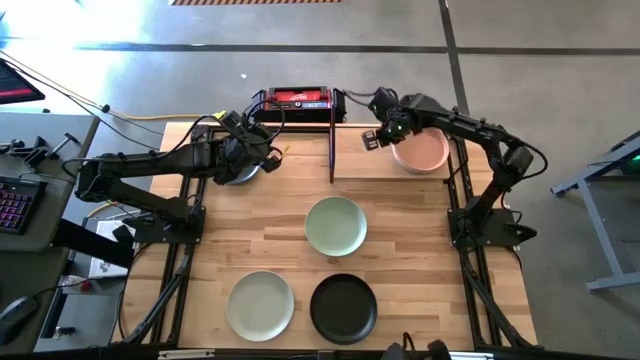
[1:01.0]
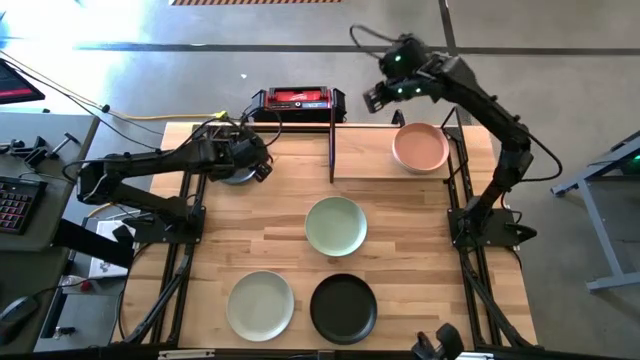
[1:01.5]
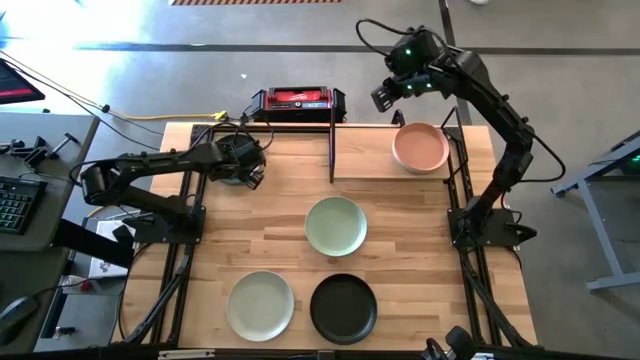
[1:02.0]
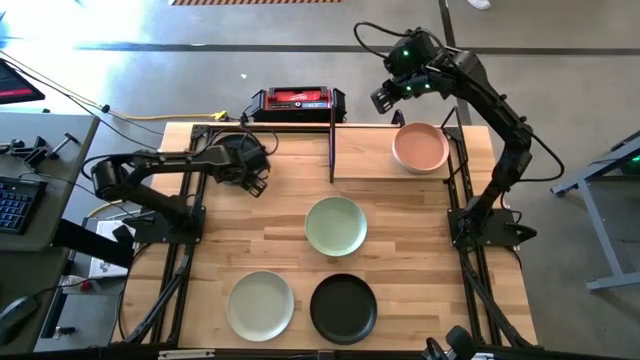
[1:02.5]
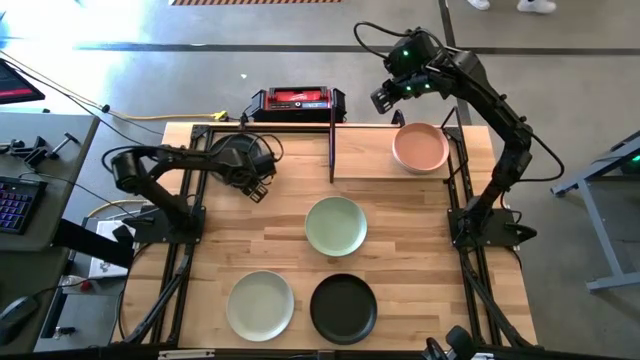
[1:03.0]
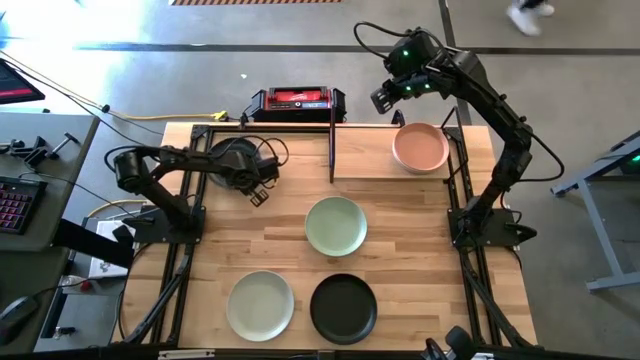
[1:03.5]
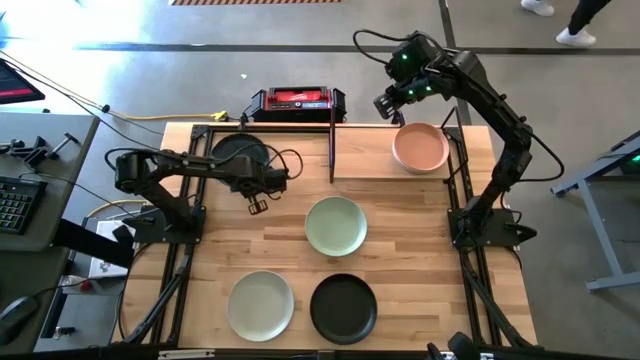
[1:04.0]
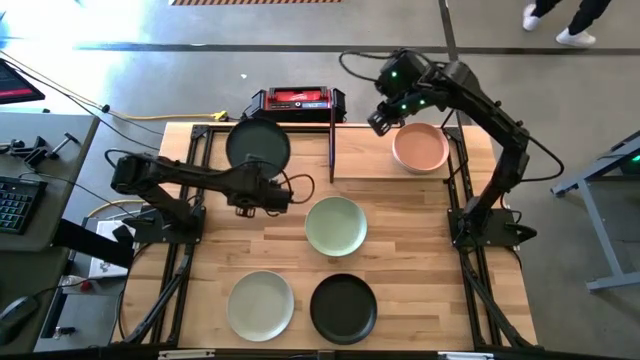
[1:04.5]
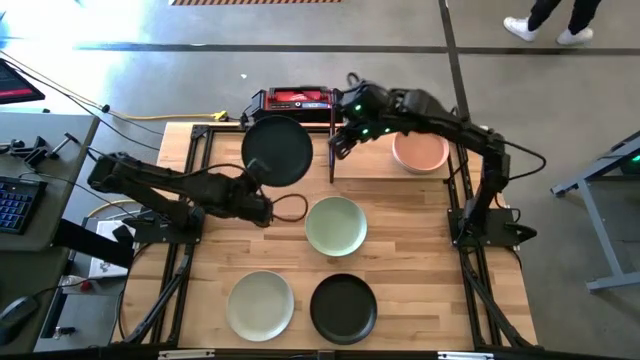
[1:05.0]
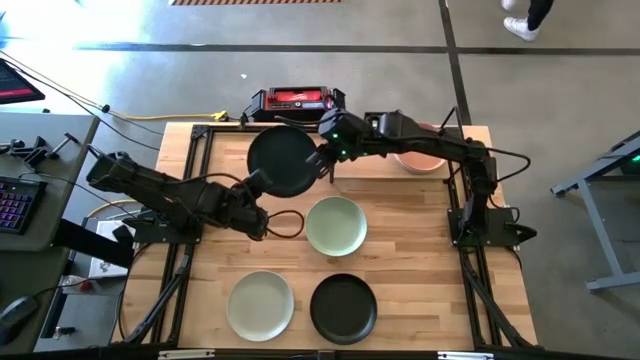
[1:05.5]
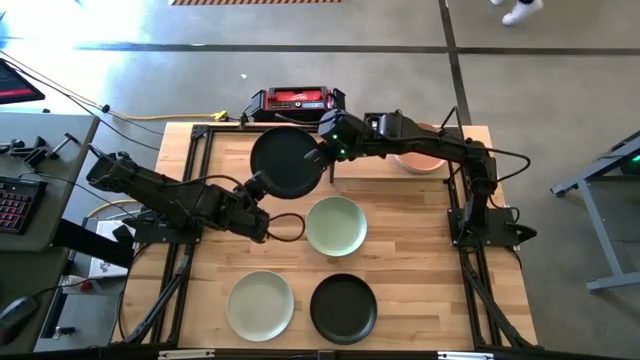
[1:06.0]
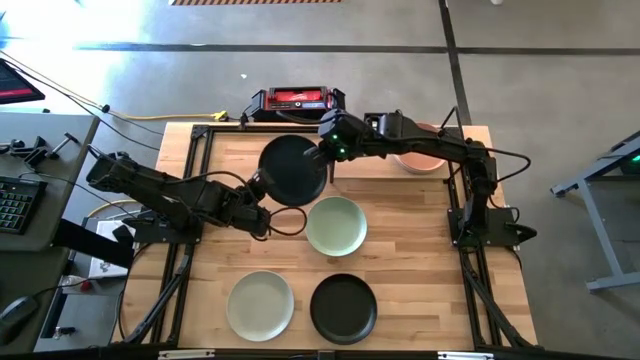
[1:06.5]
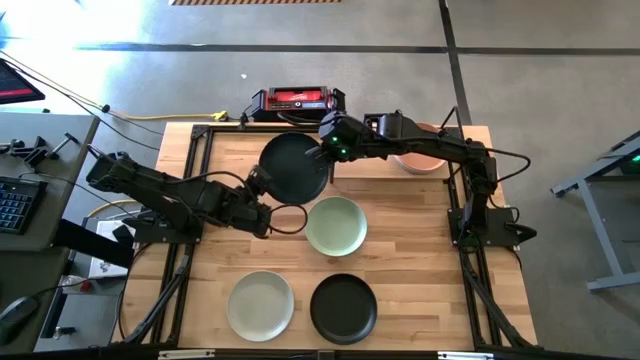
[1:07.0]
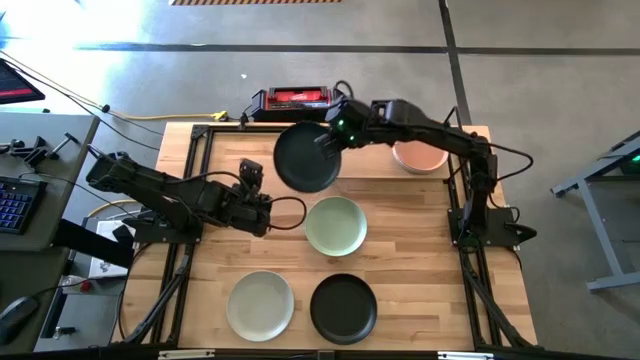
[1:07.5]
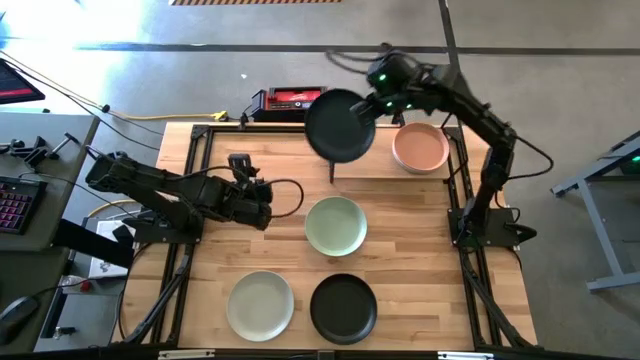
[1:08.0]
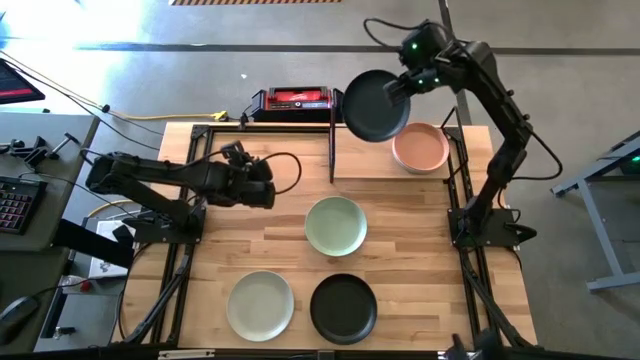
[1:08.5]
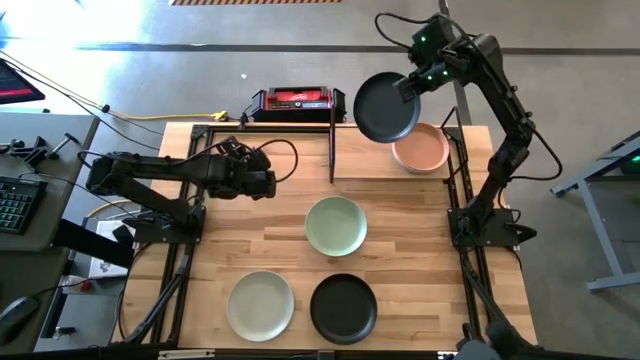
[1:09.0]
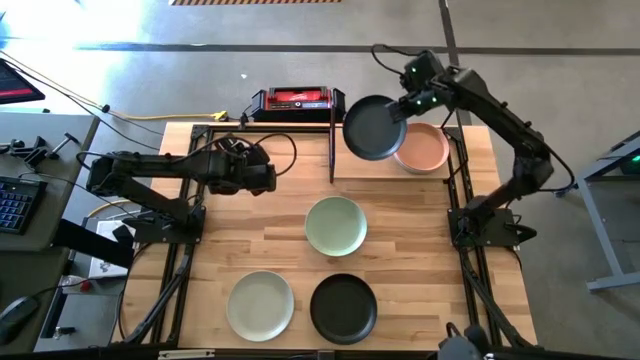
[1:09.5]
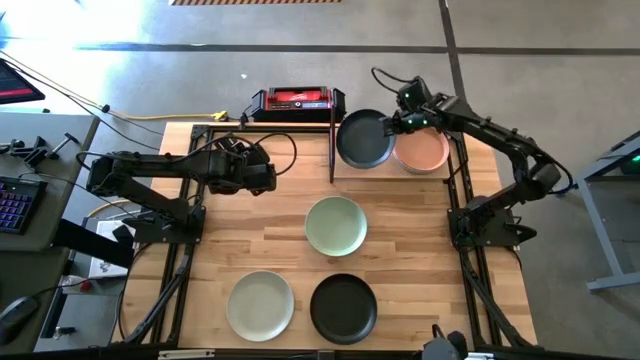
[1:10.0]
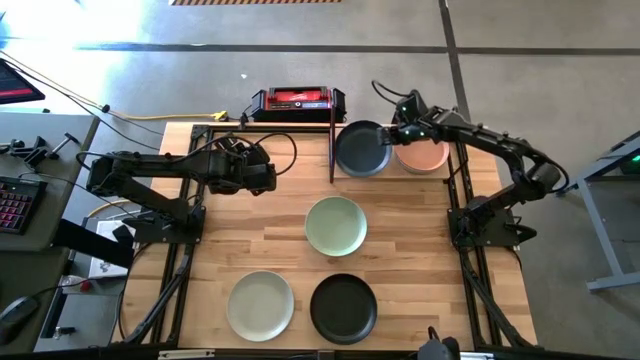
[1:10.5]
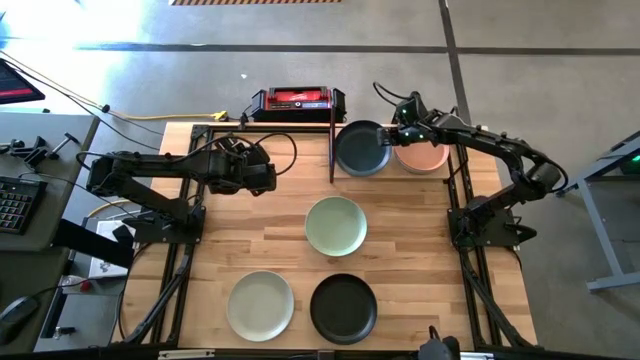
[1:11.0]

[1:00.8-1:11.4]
Task: Place and stack plates onto a shelf
Put the dark blue plate on the shelf

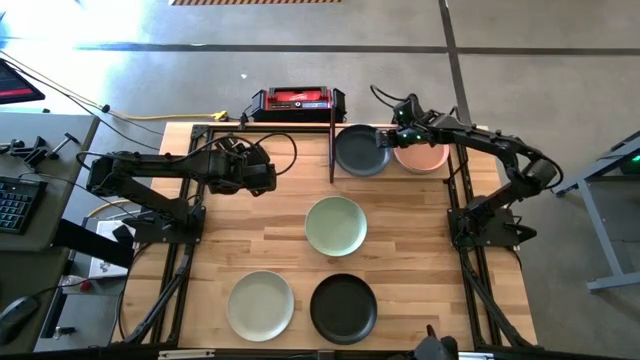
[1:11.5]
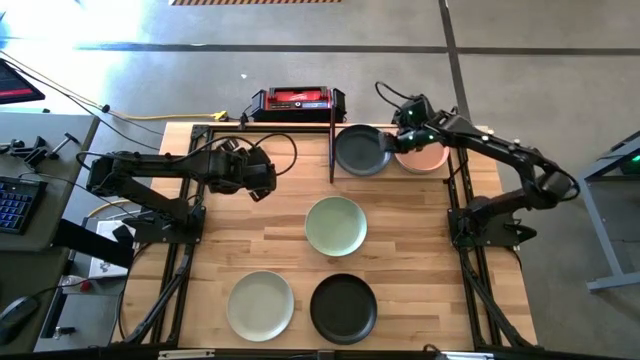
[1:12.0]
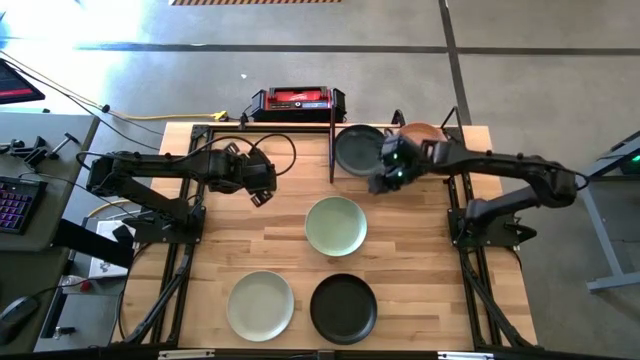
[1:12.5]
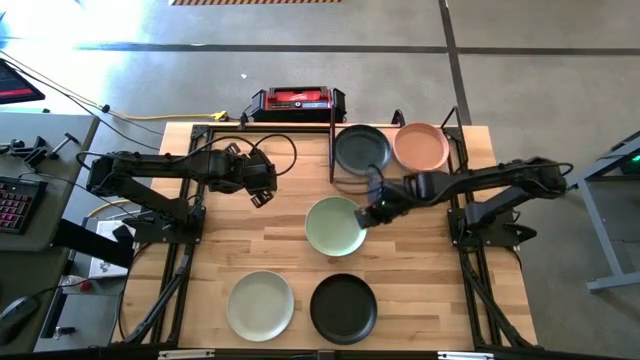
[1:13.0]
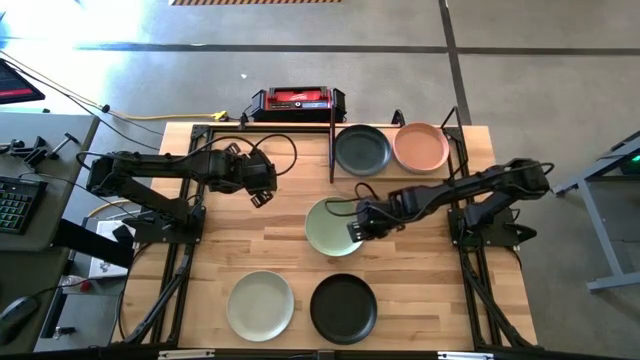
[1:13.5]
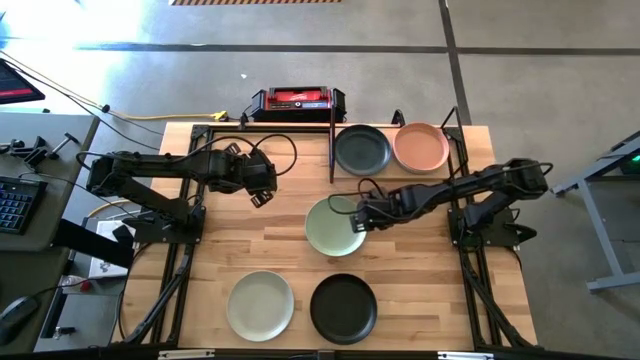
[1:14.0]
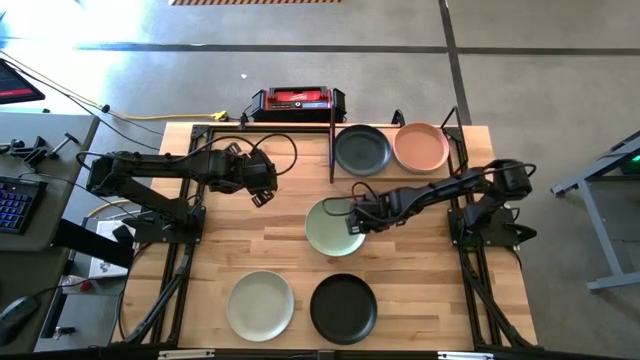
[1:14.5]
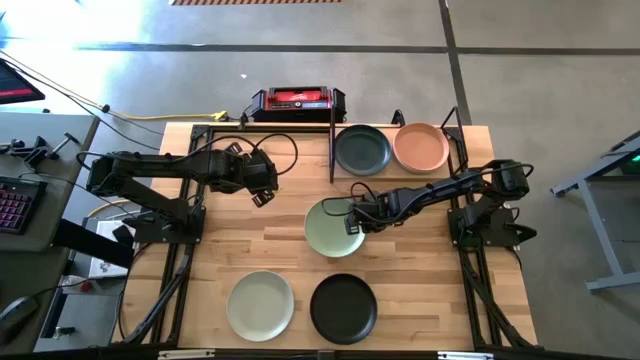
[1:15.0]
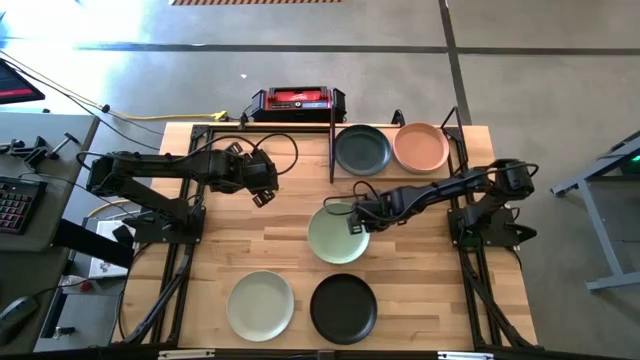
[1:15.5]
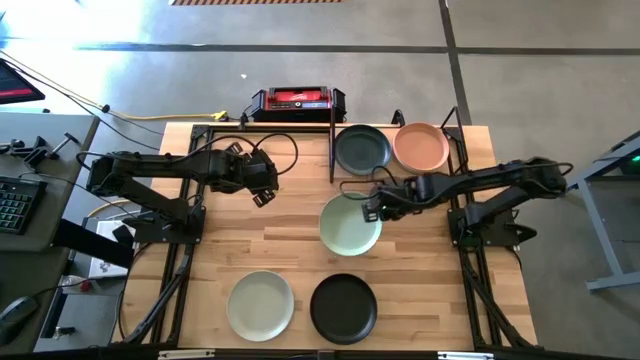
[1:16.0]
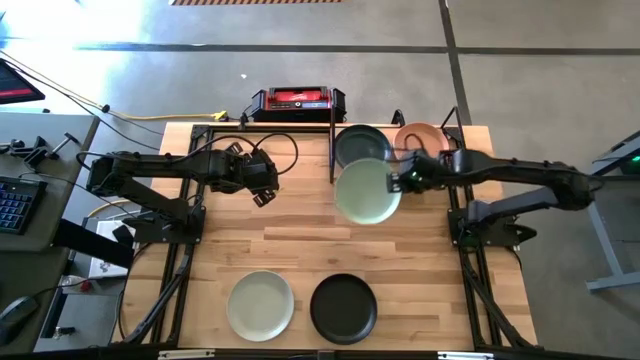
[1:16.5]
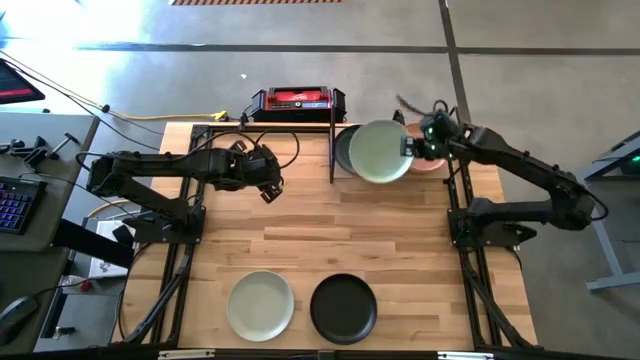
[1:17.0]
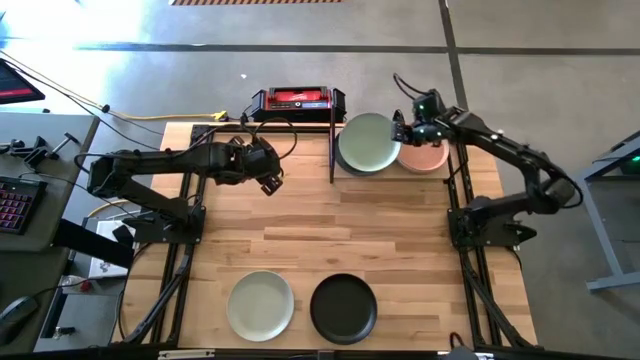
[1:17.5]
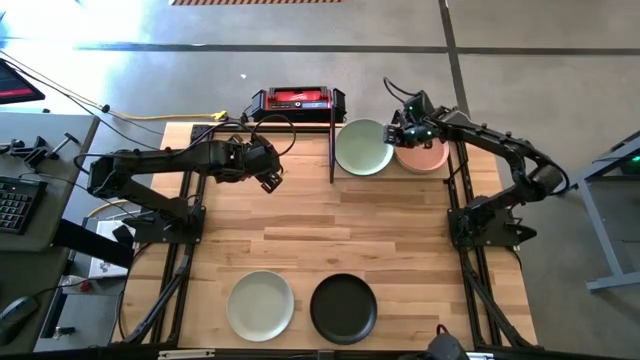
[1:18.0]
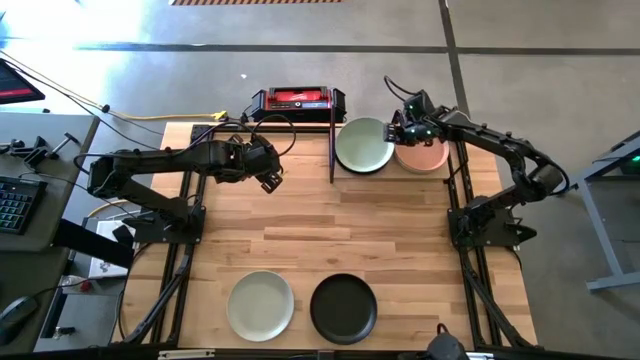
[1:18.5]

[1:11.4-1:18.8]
Stack the light green plate on top of the dark blue plate on the shelf

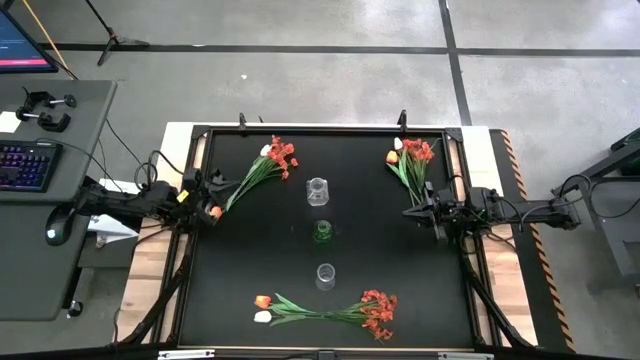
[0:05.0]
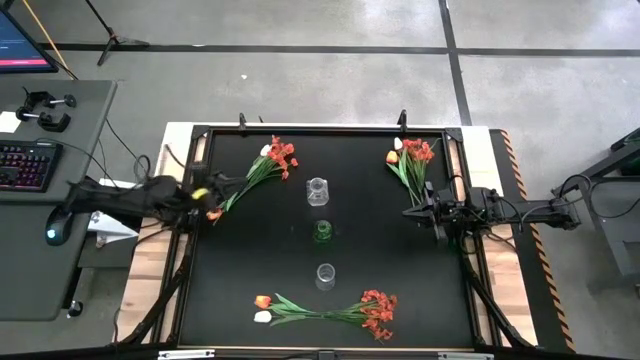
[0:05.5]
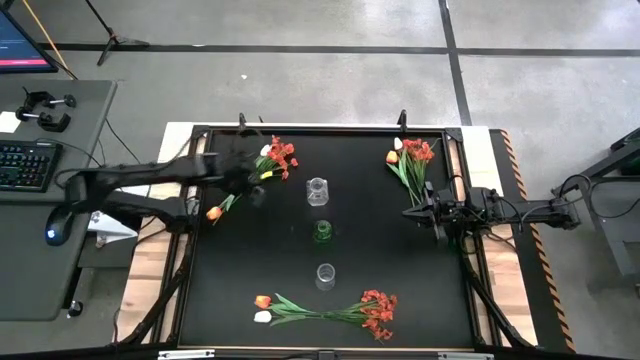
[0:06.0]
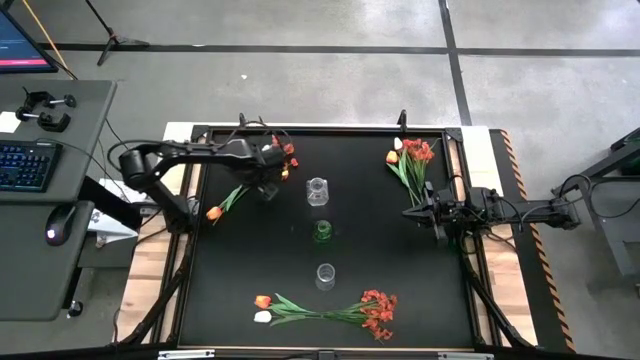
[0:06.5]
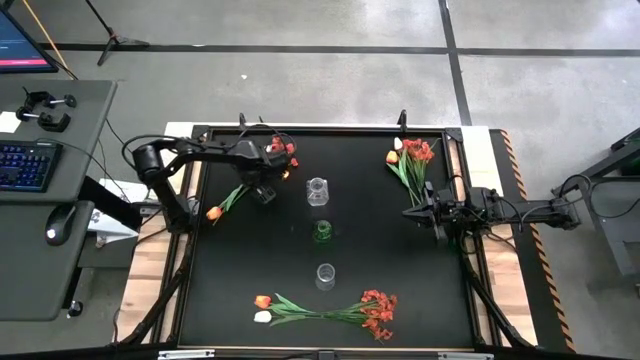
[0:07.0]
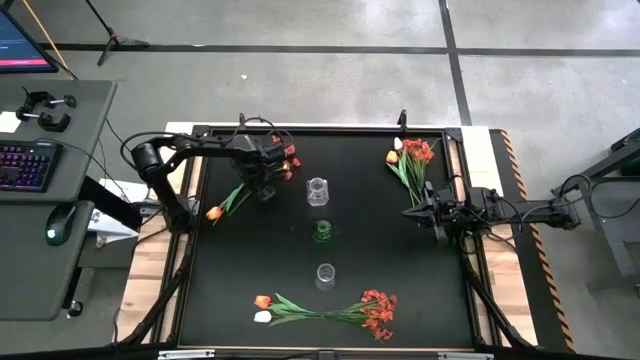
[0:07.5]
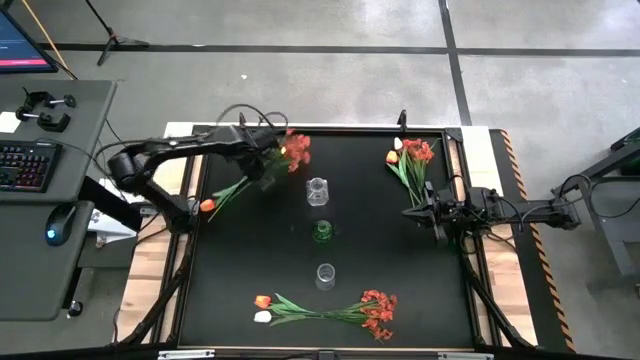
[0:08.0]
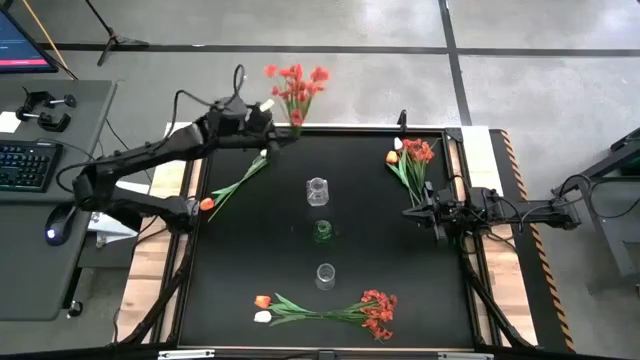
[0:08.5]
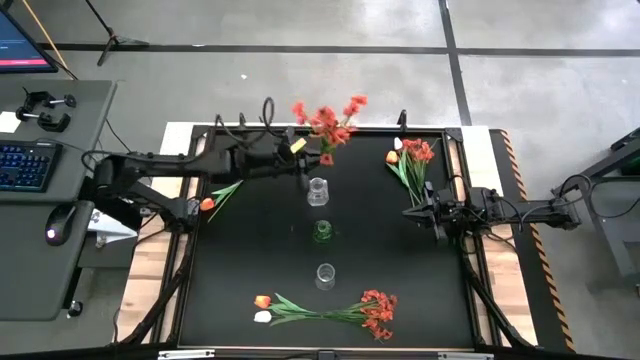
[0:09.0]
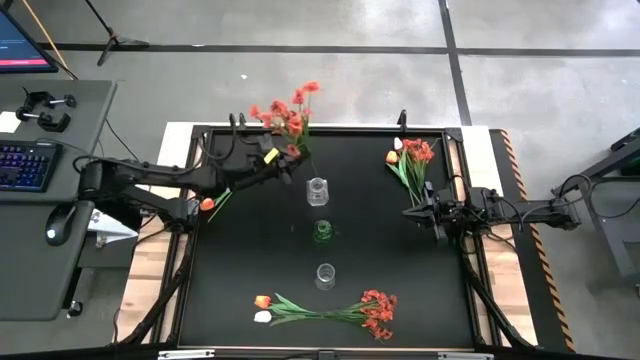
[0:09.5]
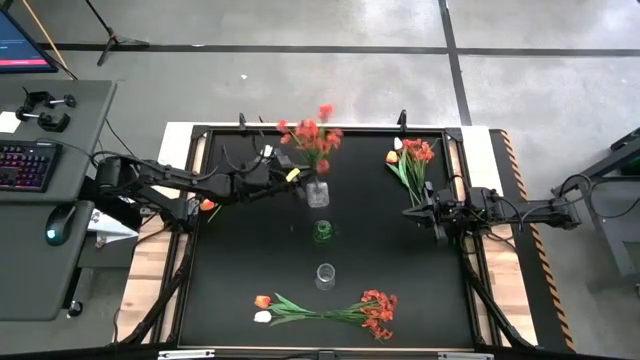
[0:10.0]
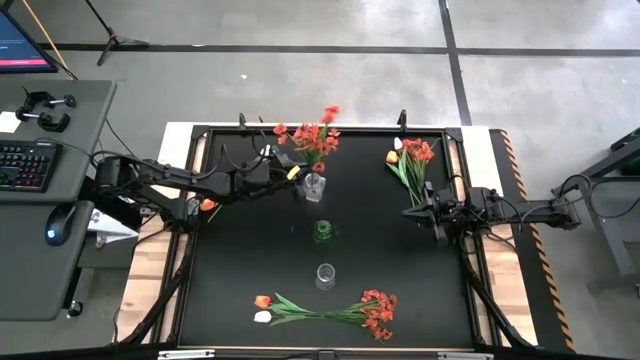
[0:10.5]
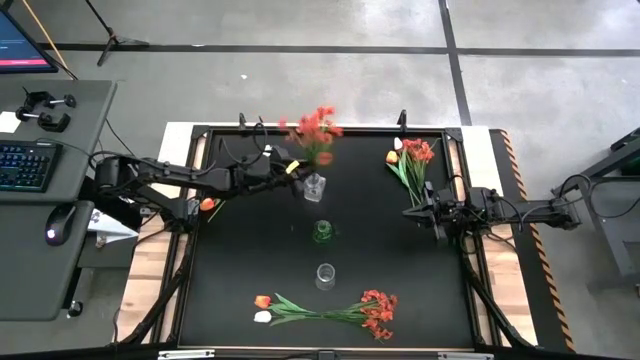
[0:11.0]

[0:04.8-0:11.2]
Task: Sort flowers into vase by color
Put the top left orange flowers into the top transparent flower vase
